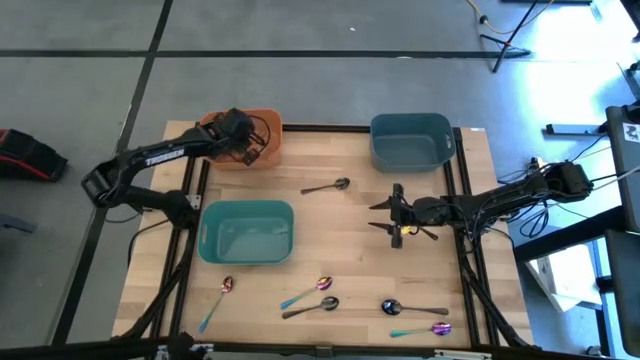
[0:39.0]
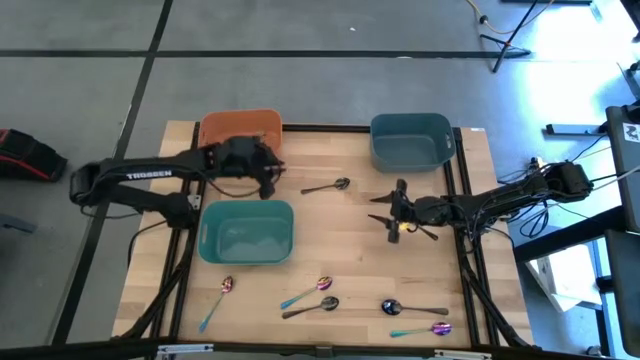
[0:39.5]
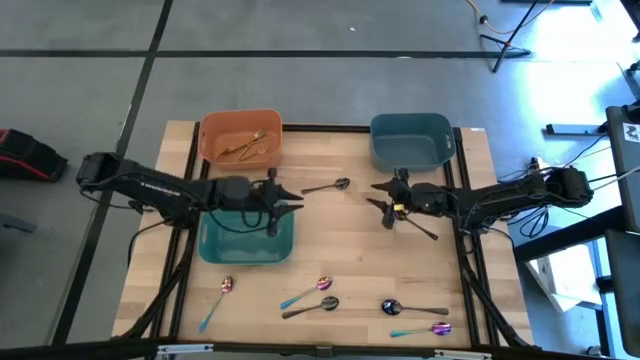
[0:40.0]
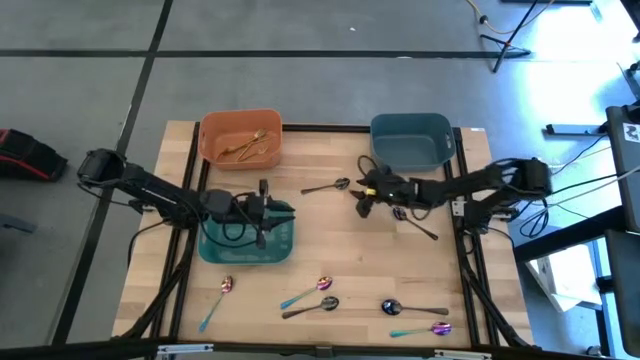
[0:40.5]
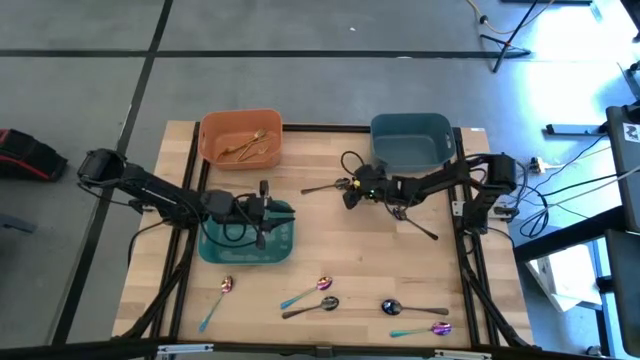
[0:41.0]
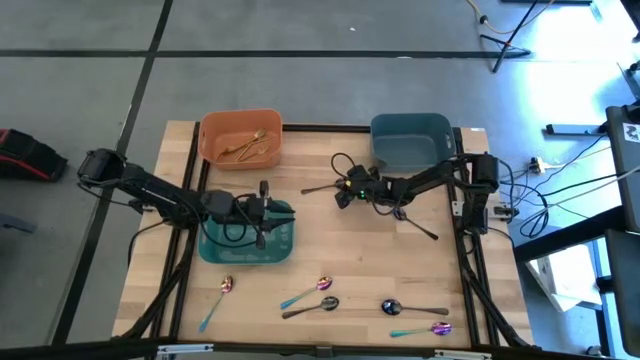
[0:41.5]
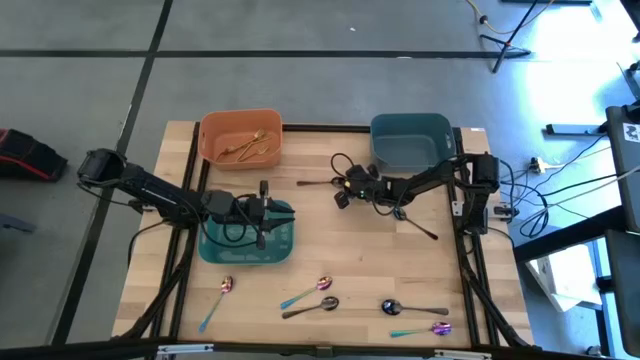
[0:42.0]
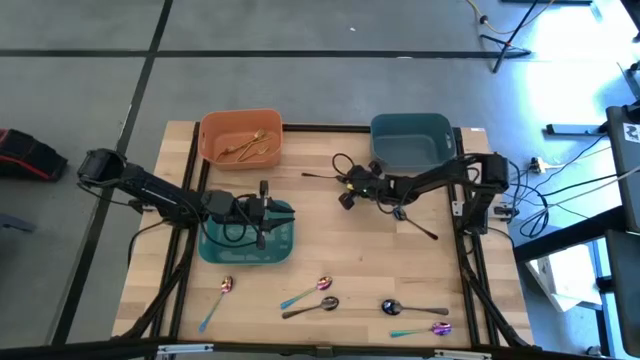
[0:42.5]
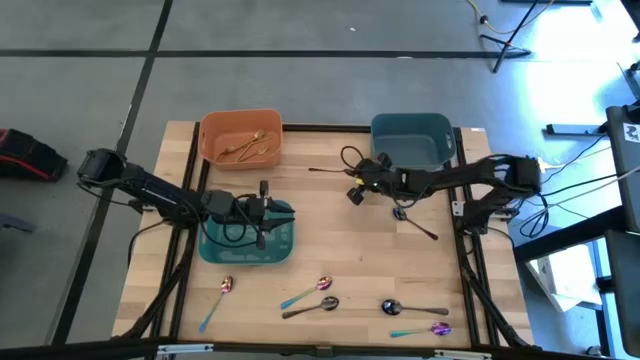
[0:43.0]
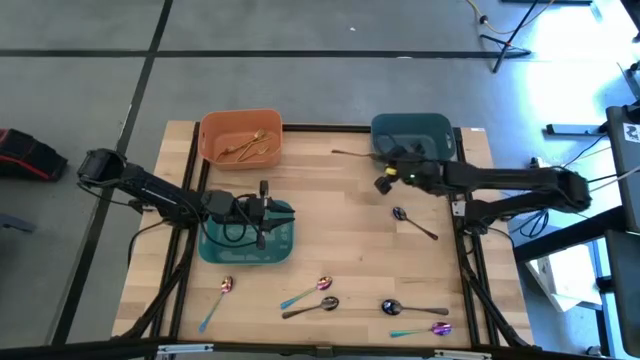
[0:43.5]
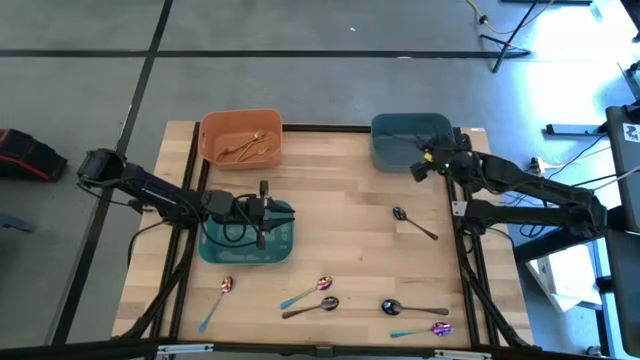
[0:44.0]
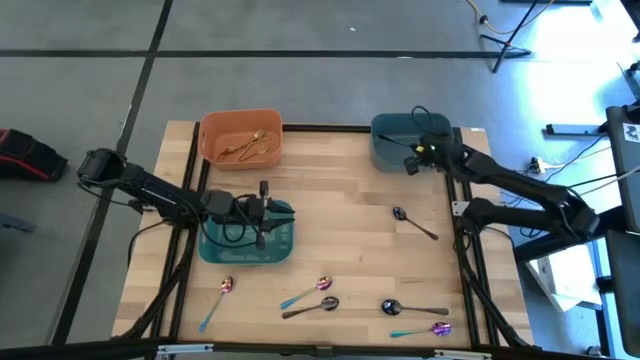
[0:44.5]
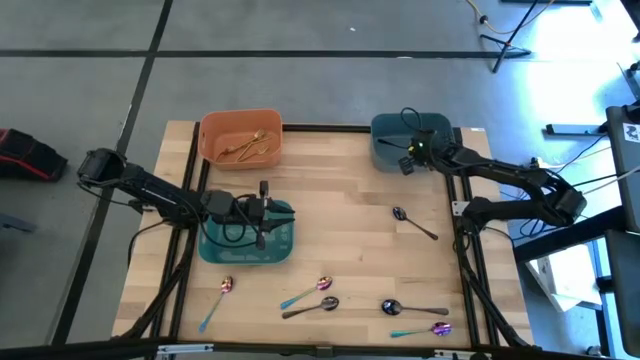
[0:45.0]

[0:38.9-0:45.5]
Task: Sort silverware by color (type)
Put the top left black spoon into the top blue bin

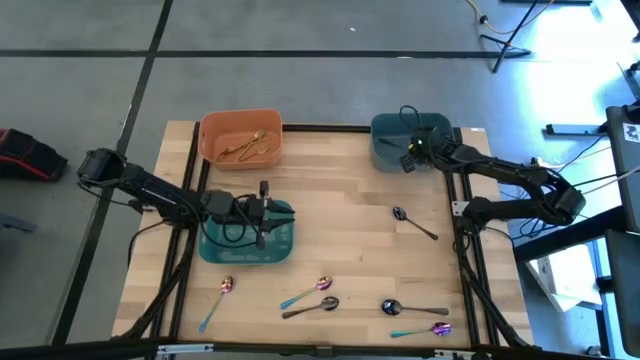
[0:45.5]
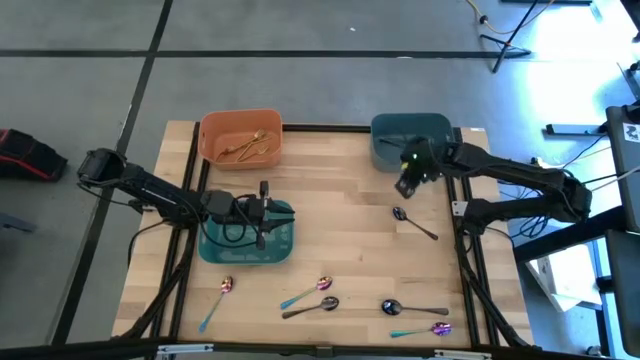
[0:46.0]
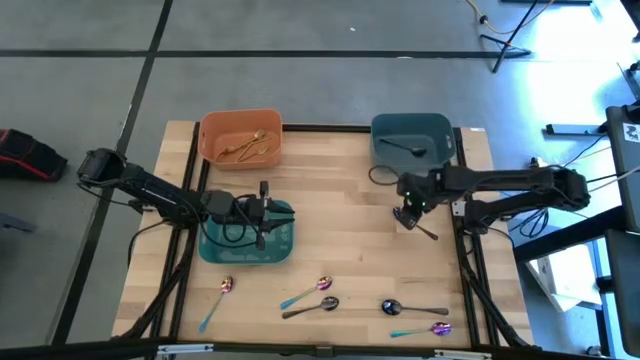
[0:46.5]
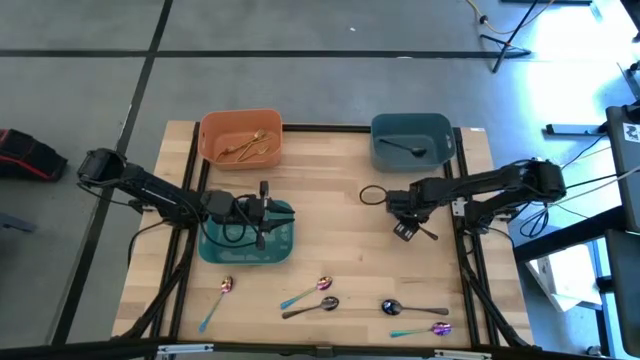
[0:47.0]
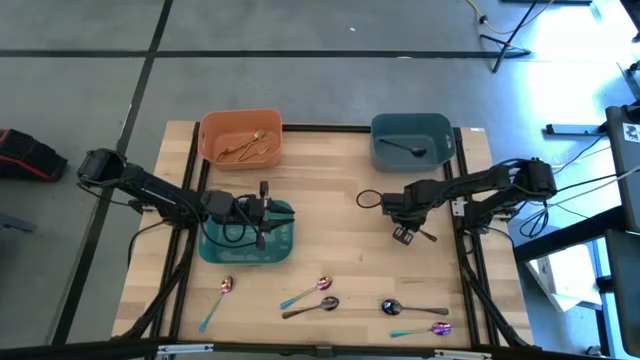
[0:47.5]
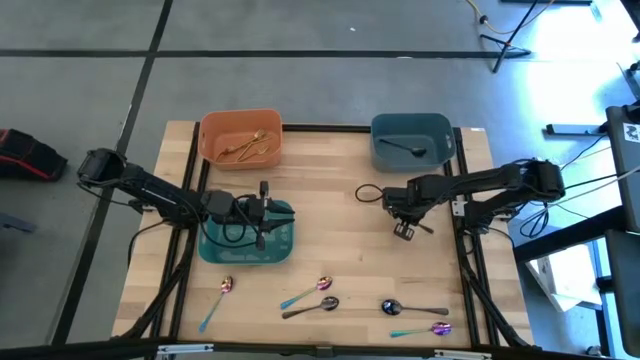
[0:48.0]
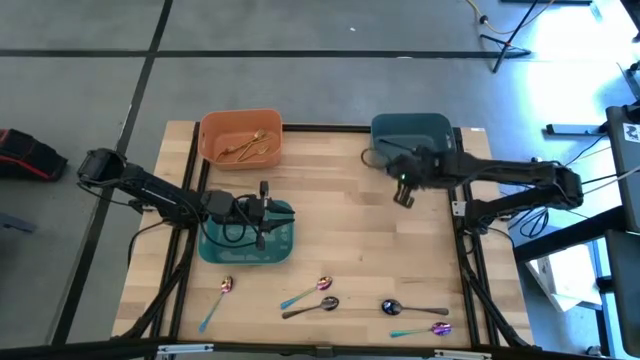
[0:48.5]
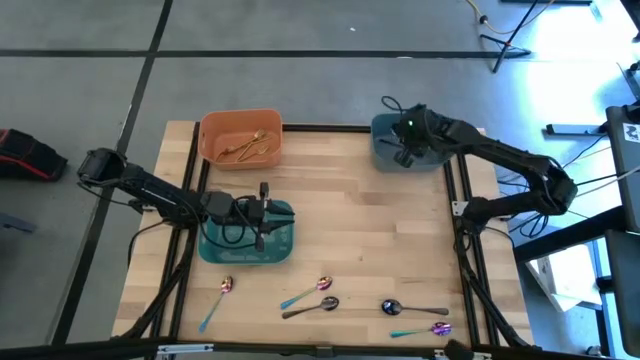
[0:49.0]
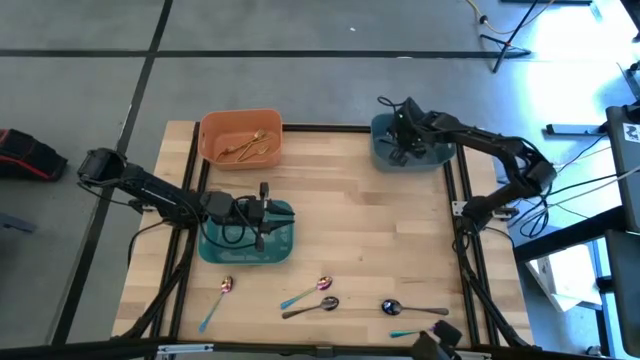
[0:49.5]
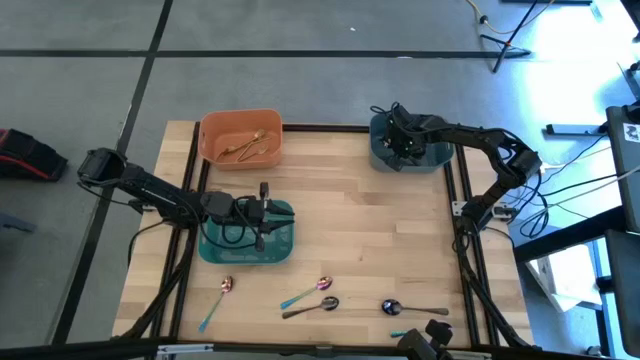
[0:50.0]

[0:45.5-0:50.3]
Put the top right black spoon into the top blue bin

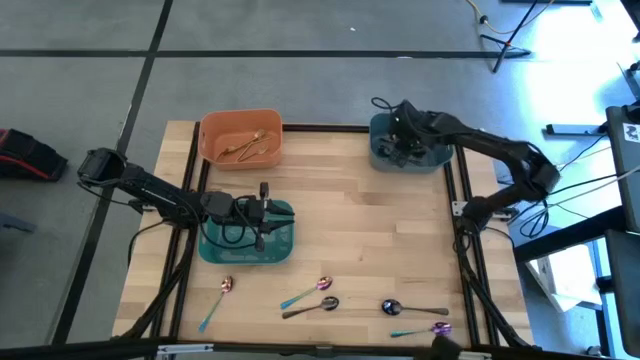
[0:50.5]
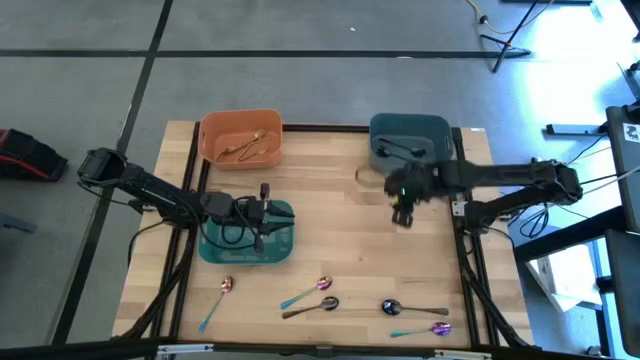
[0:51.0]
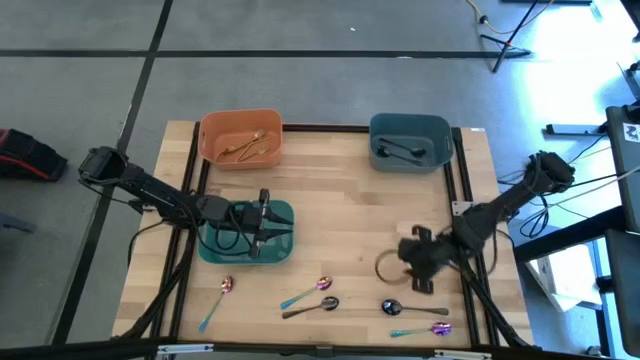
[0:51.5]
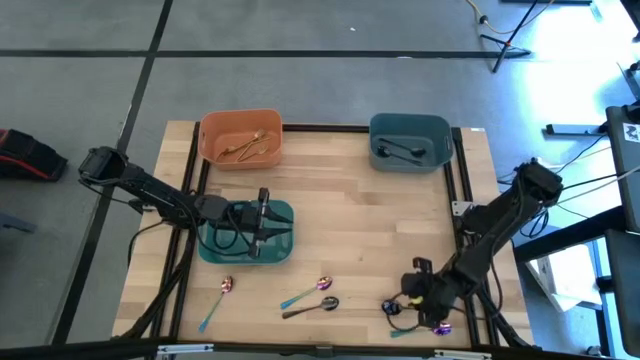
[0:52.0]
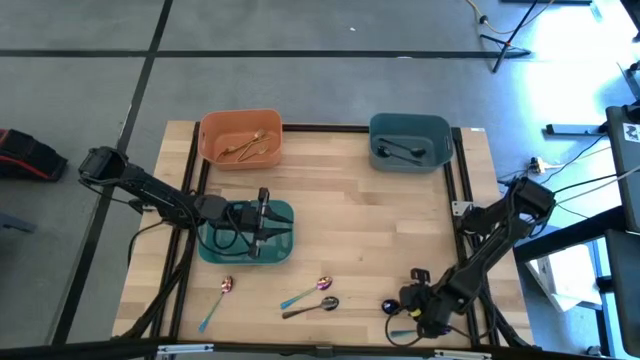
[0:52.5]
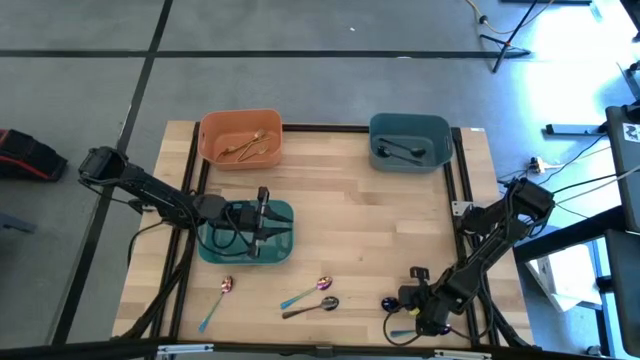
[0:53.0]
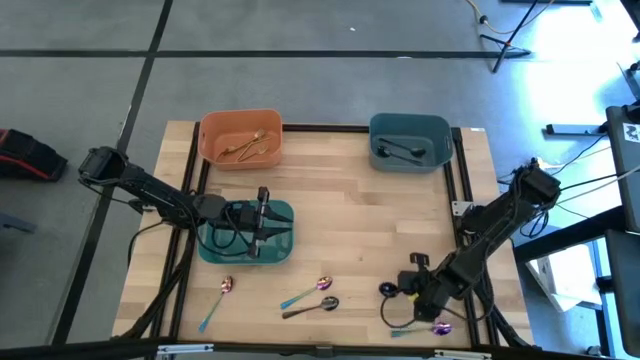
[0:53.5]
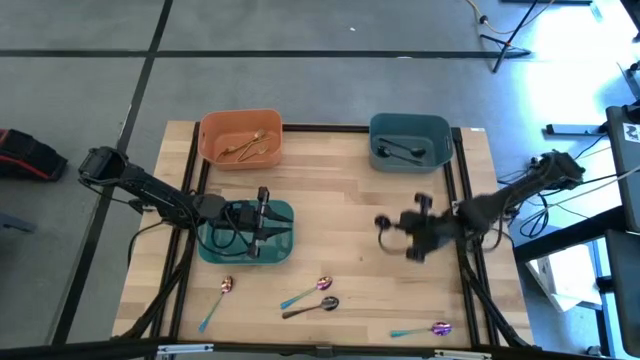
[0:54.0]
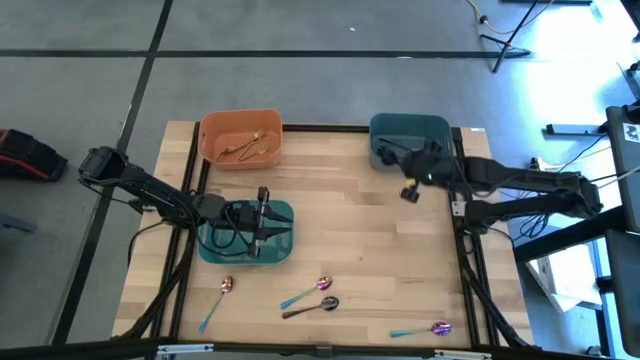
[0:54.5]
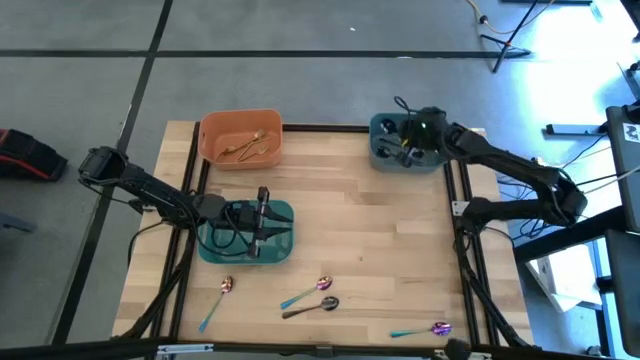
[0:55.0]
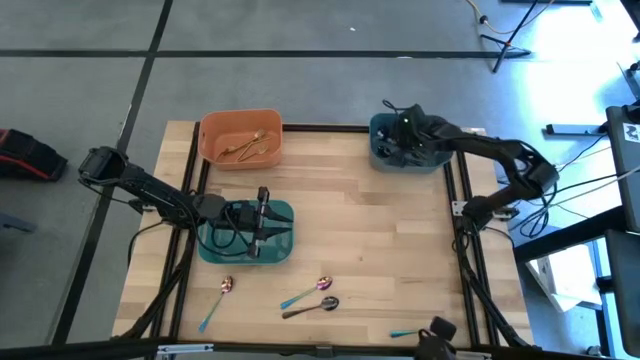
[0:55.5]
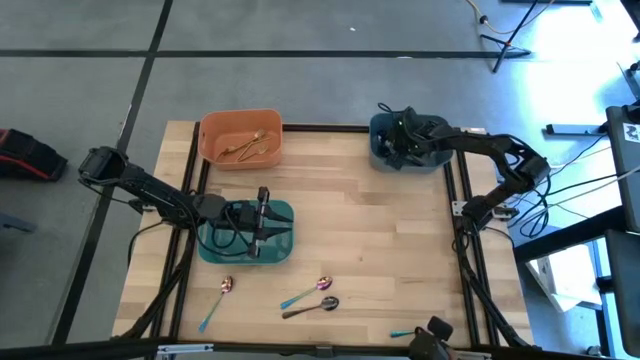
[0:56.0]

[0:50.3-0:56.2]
Put the right black spoon into the top blue bin

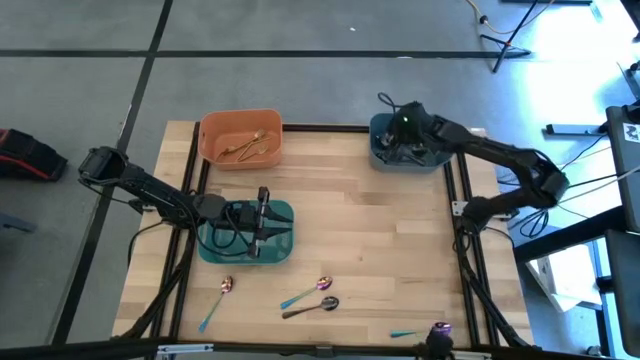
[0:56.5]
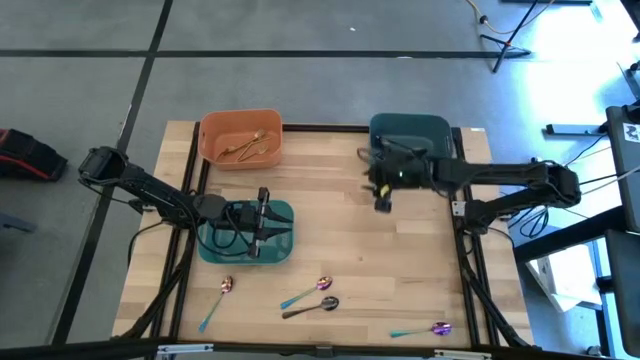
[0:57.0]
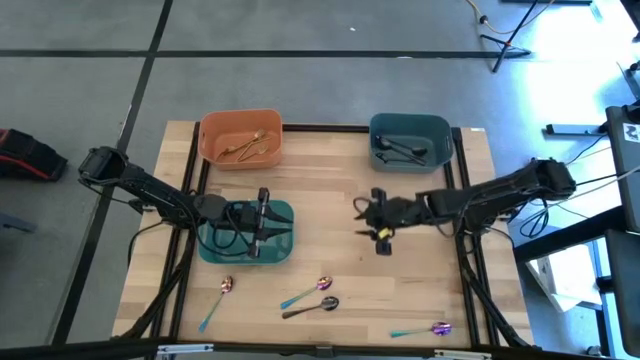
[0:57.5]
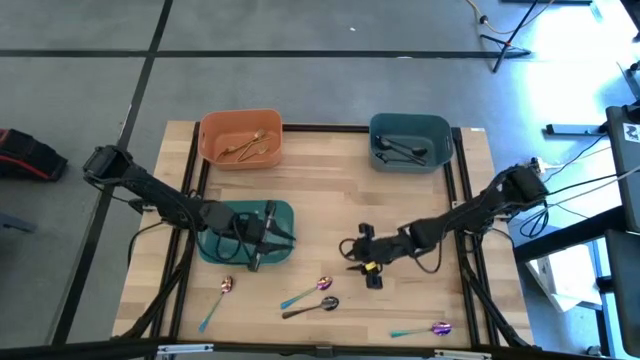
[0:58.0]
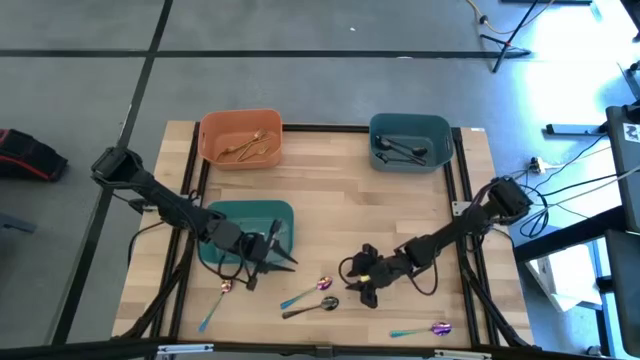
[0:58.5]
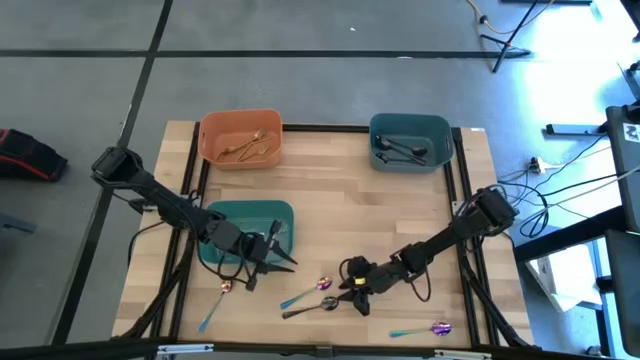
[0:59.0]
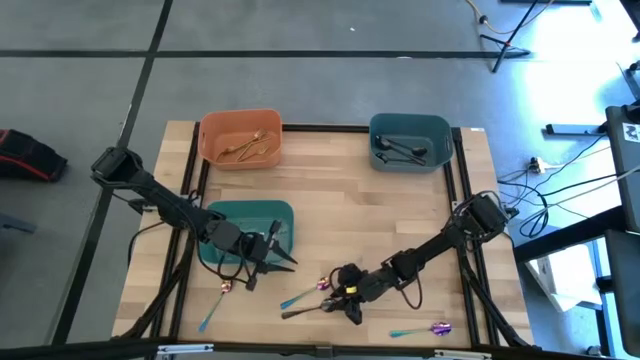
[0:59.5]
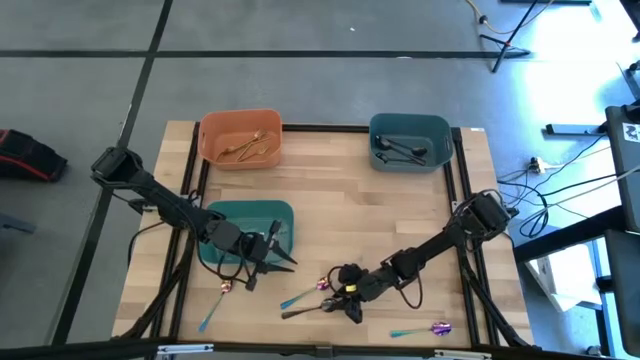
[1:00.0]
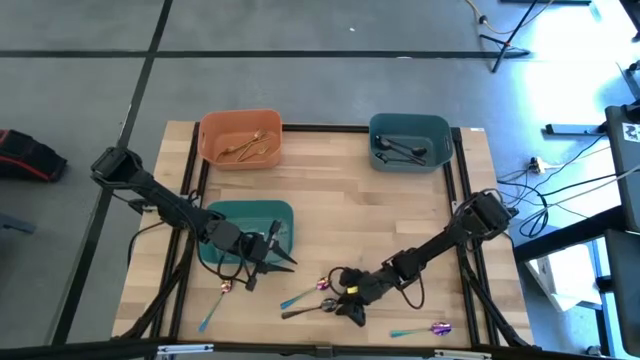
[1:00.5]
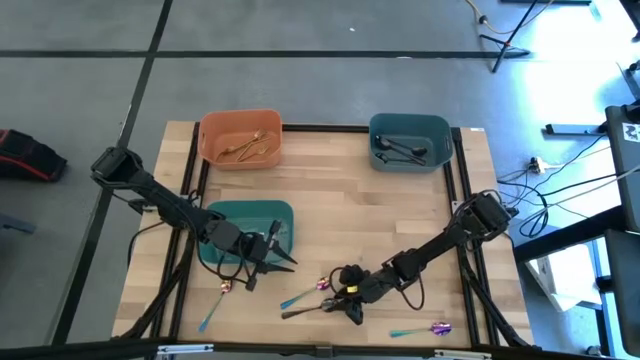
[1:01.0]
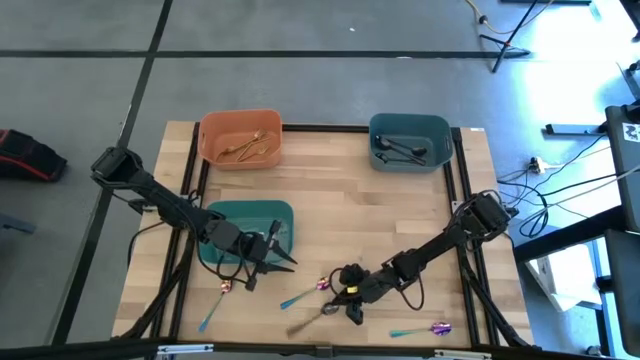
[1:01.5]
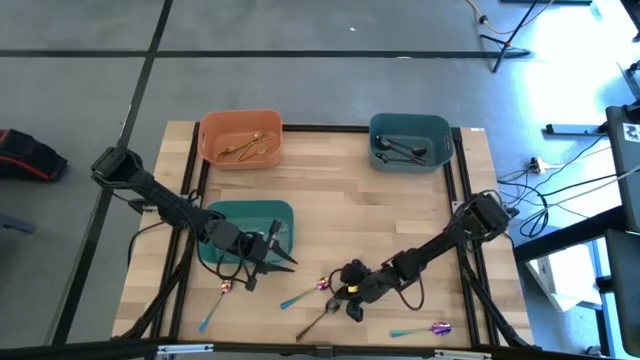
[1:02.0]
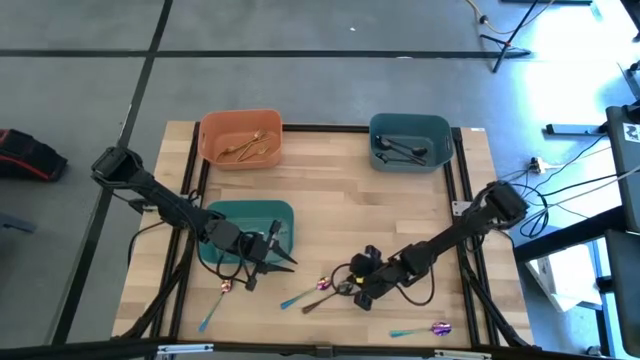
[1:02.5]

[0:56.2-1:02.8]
Put the black spoon into the top blue bin
